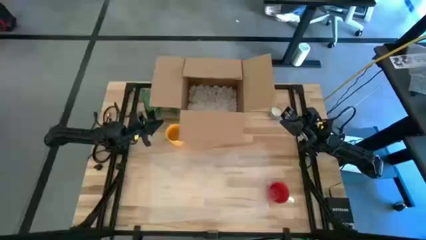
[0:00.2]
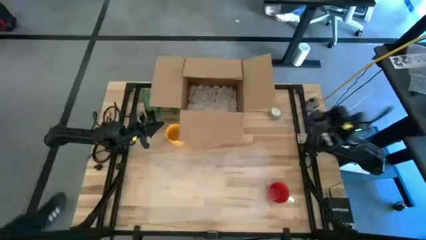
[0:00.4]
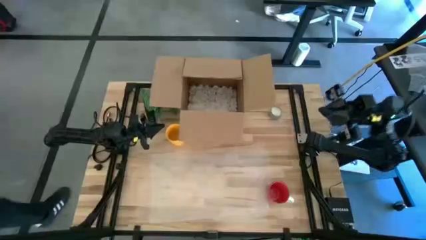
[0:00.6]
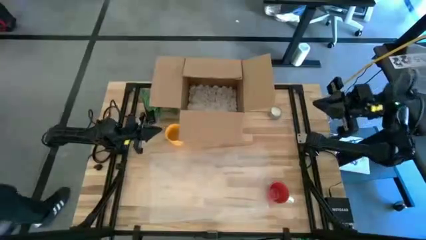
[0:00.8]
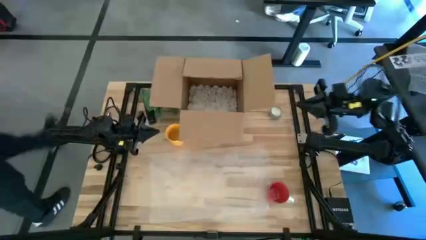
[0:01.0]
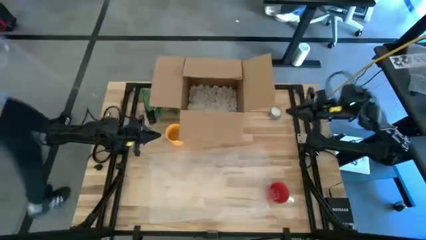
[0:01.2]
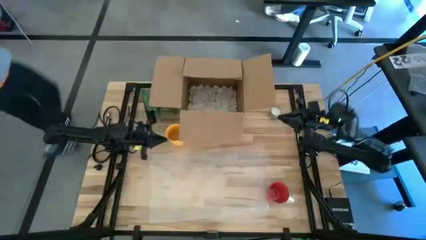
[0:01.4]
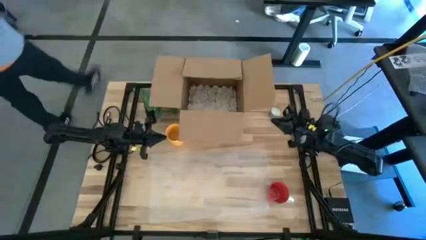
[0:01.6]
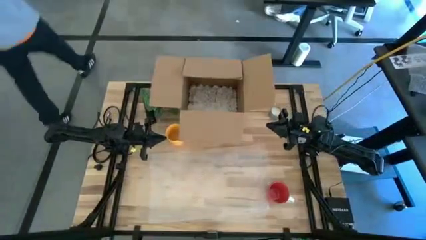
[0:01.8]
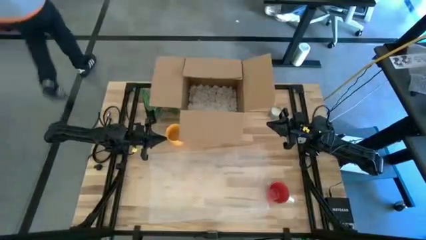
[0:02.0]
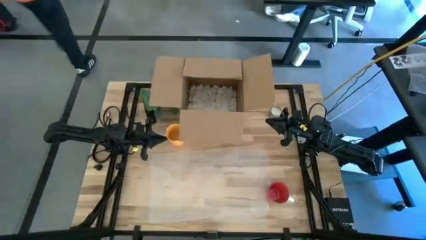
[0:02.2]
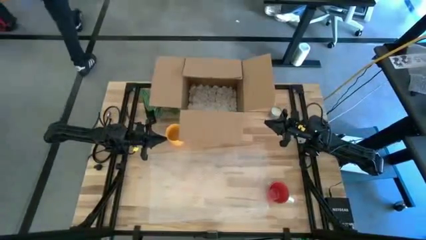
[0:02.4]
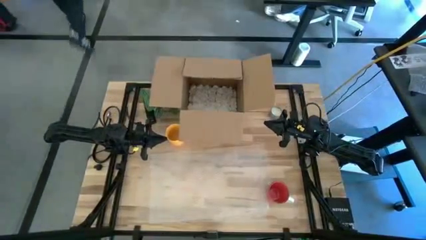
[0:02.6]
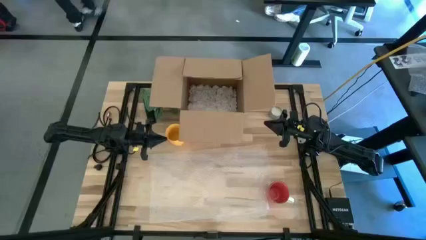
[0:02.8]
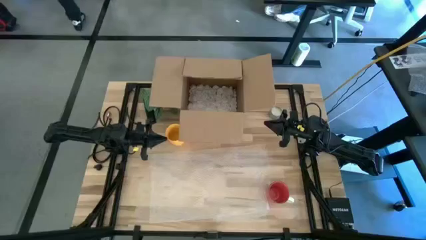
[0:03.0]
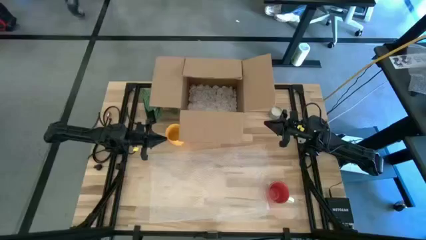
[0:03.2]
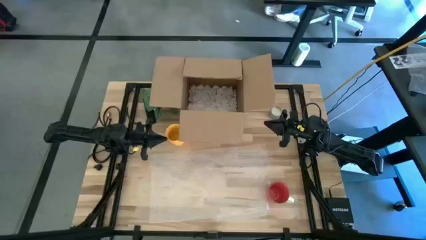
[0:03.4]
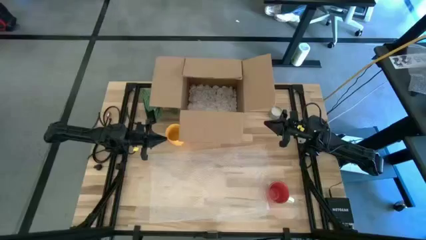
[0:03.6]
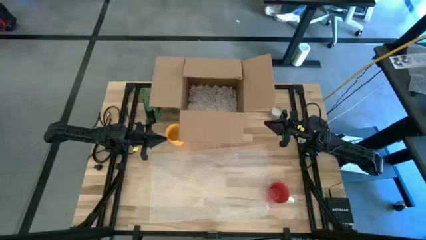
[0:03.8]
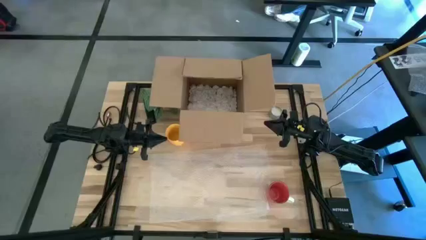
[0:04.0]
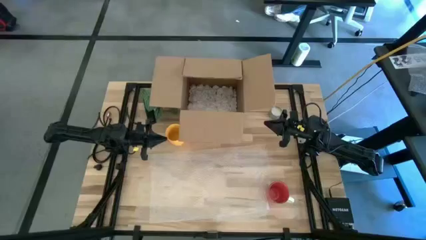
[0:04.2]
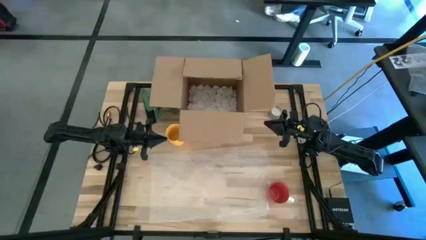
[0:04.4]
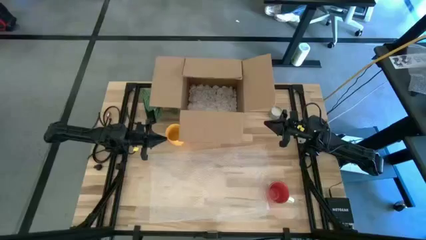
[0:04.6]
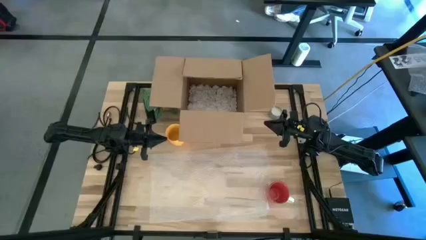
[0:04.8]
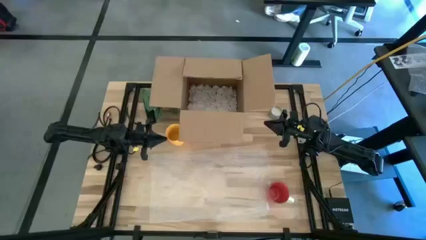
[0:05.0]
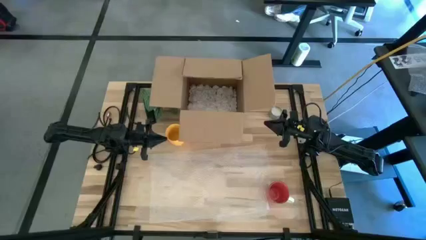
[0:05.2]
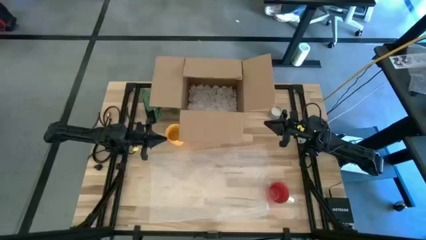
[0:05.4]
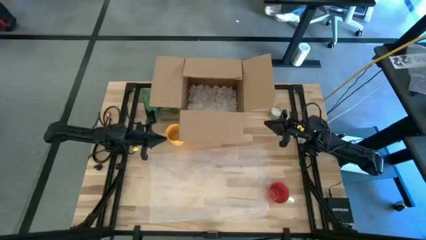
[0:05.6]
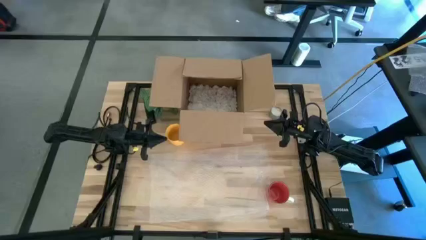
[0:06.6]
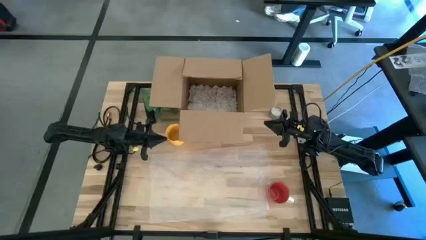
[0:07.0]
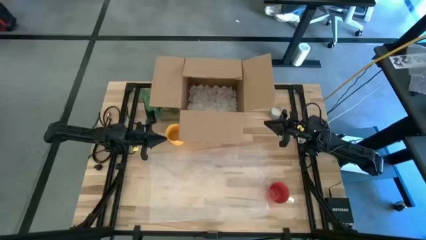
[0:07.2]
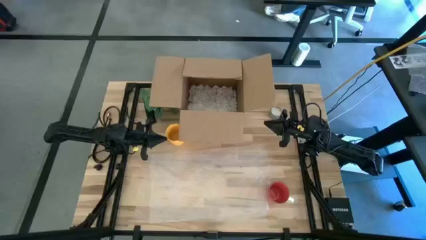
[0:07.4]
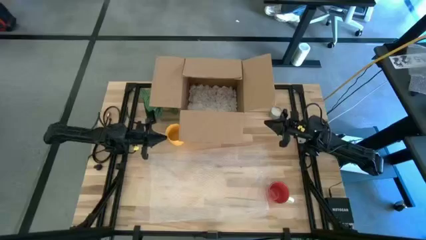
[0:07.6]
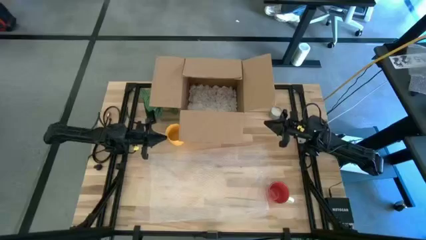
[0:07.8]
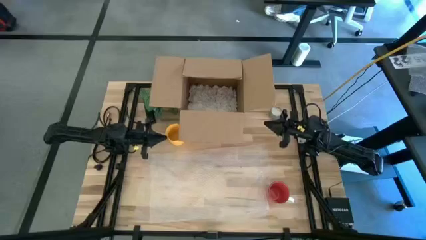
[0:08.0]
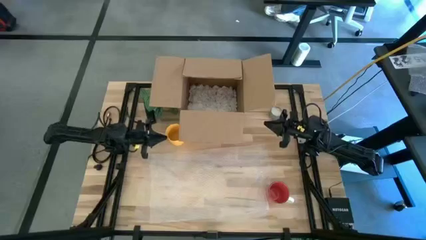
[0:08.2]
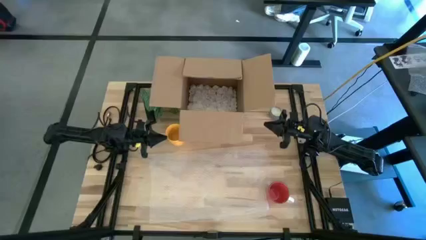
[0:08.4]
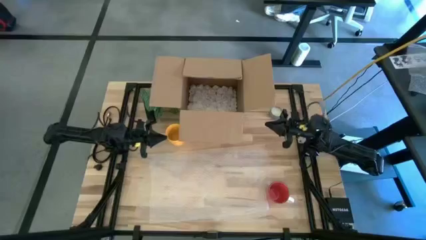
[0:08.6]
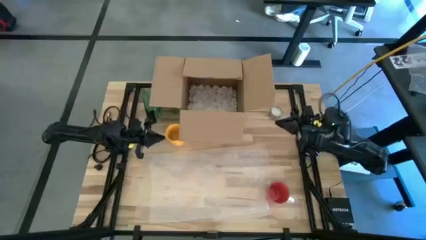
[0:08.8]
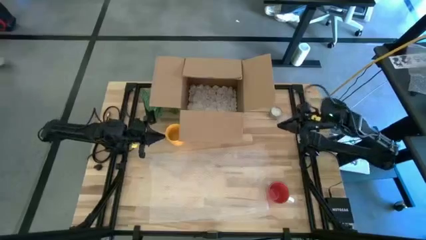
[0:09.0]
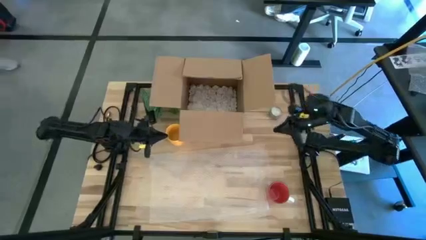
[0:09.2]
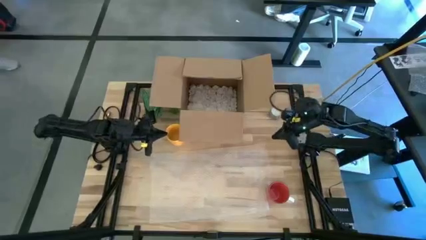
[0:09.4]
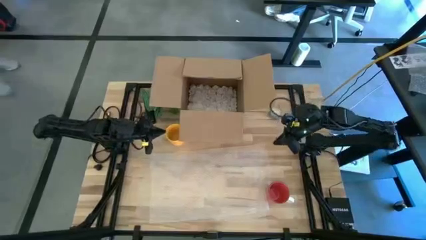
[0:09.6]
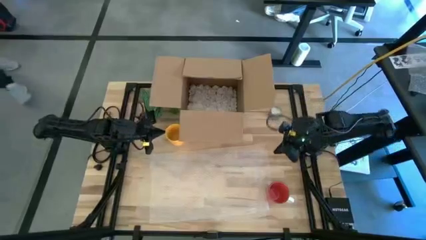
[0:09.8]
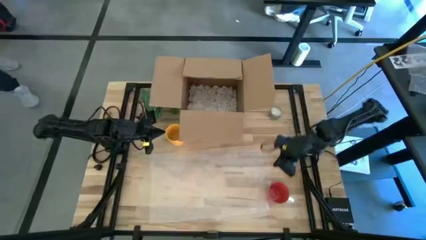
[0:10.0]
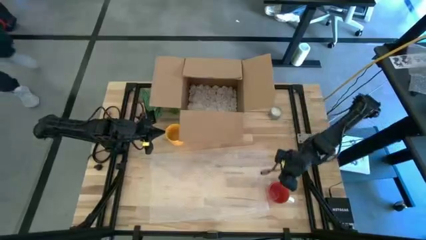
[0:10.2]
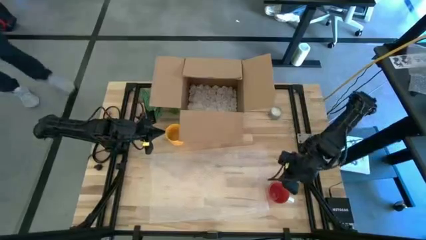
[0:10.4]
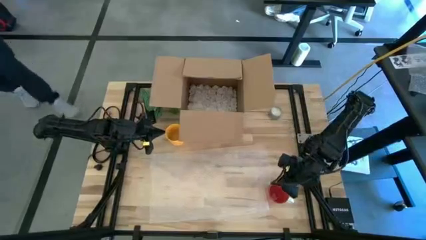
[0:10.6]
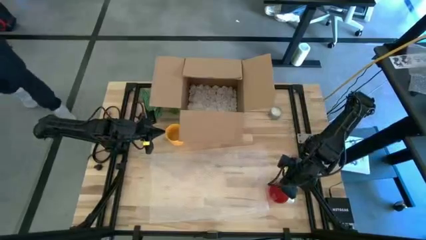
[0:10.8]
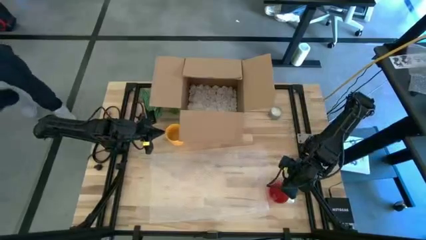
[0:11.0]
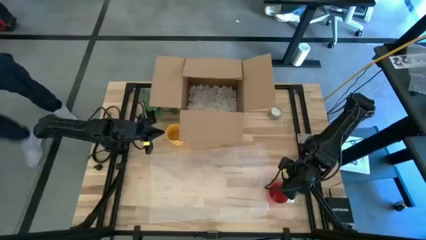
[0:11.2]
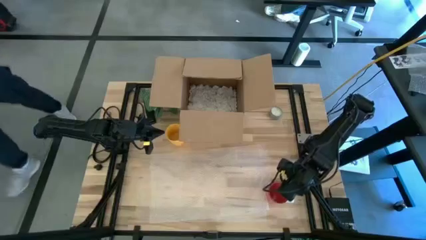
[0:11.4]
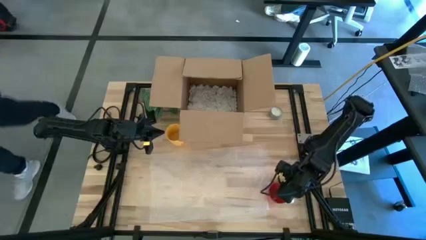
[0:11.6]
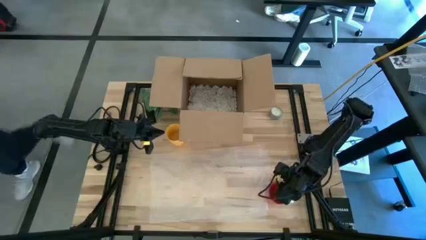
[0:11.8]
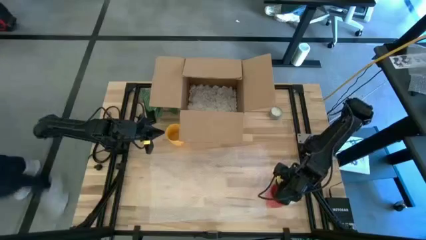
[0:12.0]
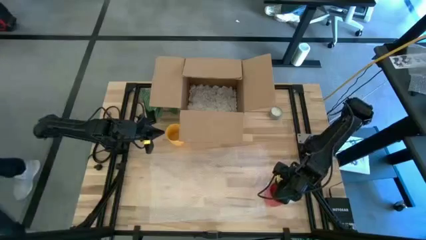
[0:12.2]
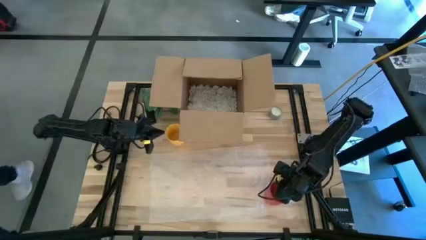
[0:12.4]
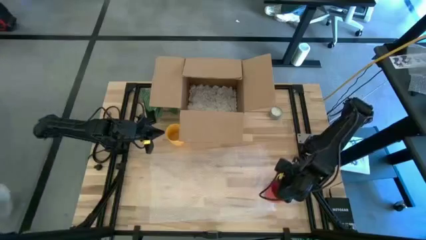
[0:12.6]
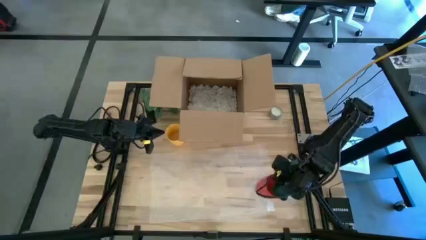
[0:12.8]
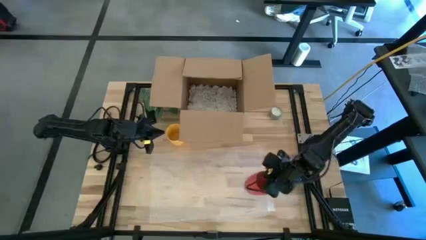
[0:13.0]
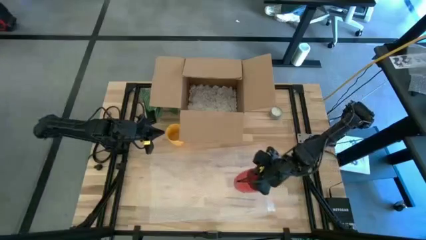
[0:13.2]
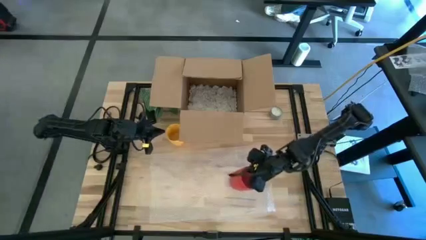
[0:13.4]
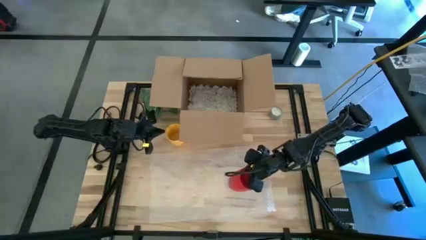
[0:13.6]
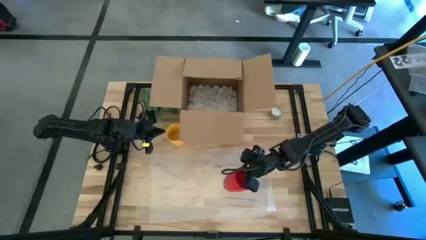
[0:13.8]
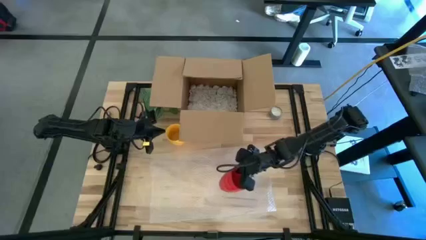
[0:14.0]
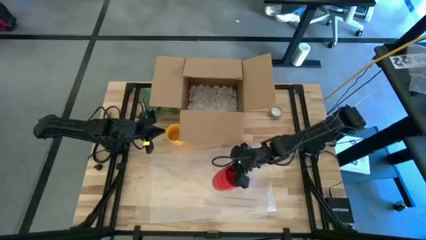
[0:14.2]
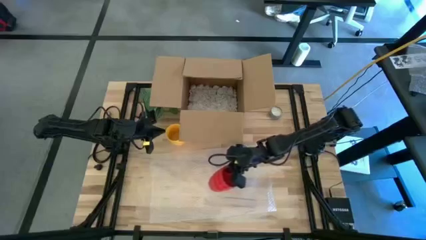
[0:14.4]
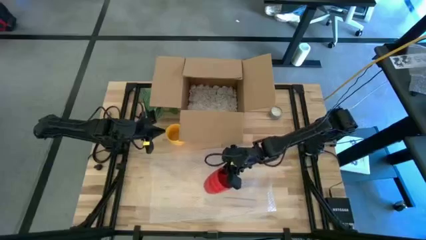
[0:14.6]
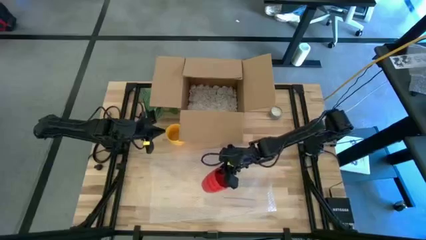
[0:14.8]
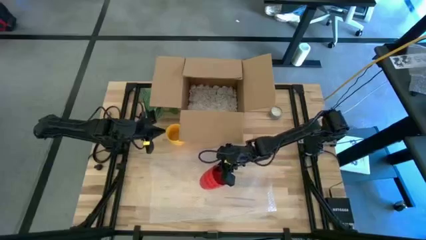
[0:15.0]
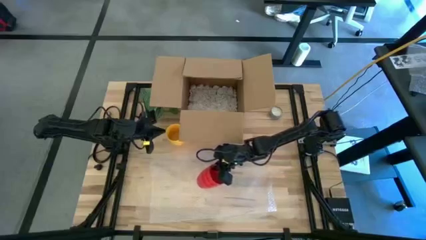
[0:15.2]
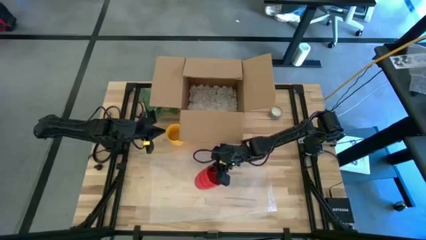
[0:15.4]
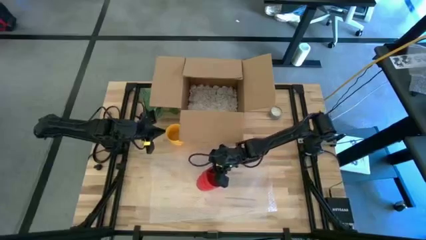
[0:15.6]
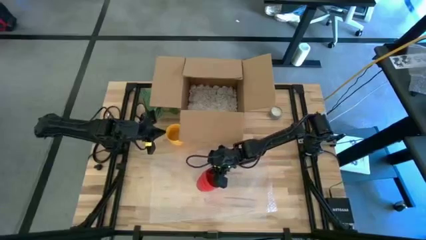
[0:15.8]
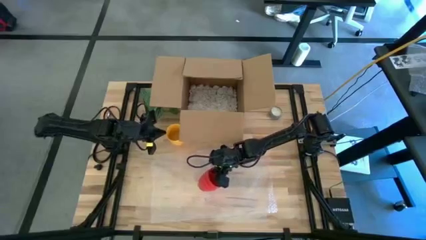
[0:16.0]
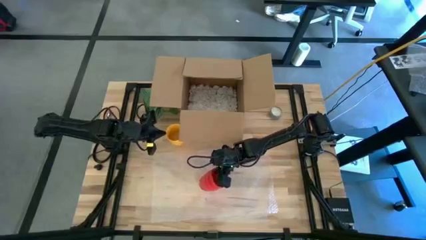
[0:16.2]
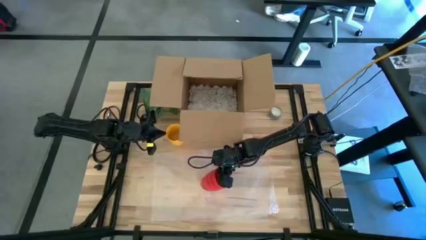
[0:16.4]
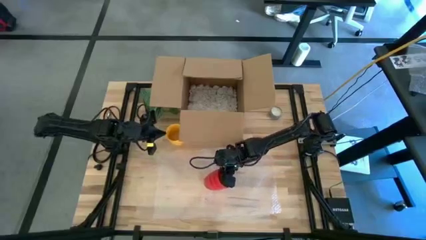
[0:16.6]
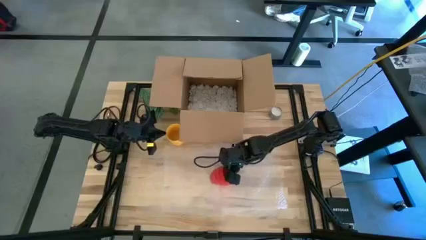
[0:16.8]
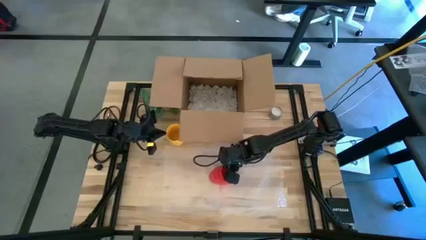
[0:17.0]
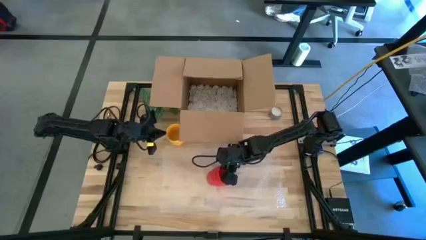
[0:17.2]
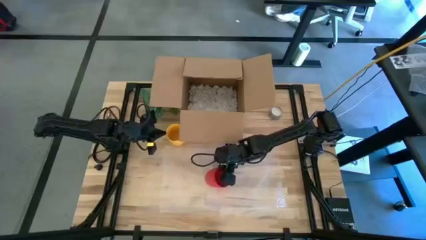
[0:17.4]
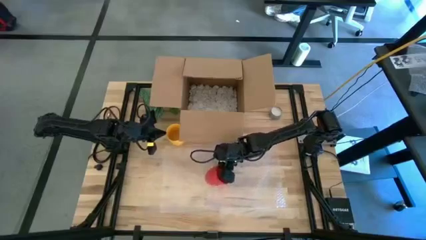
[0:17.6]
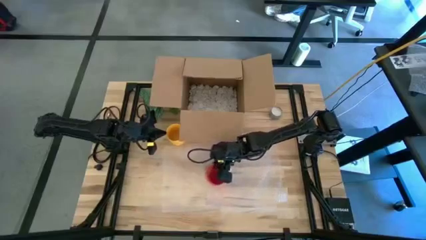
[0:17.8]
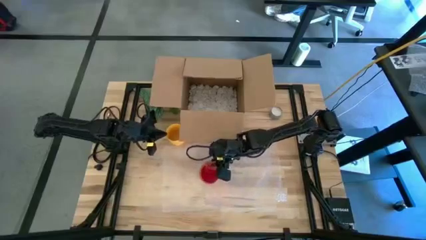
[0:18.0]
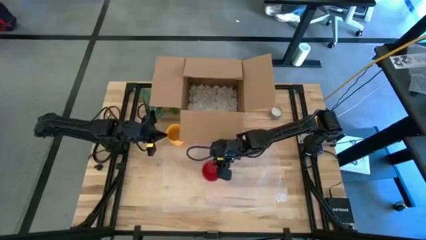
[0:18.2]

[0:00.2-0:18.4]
Task: wrap mug
Wrap the orange mug with the bubble wrap
